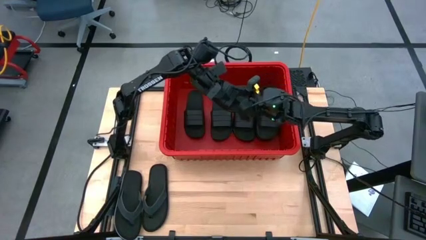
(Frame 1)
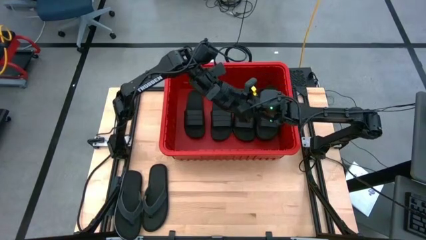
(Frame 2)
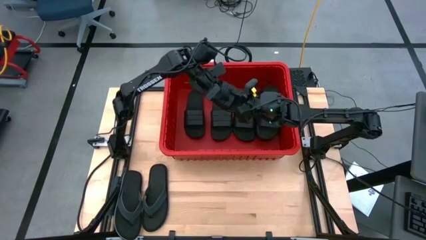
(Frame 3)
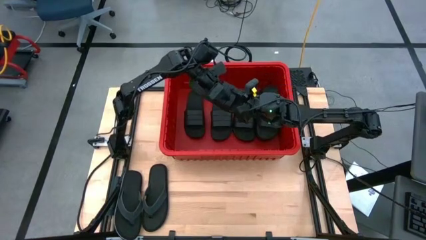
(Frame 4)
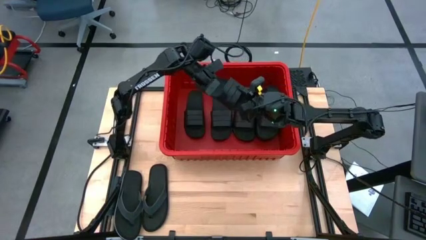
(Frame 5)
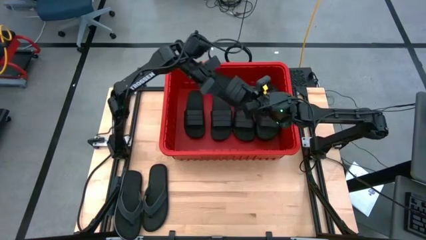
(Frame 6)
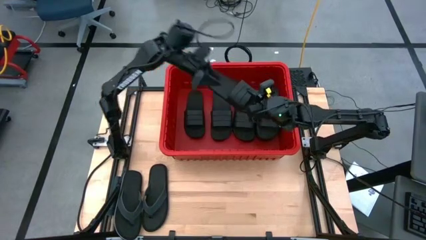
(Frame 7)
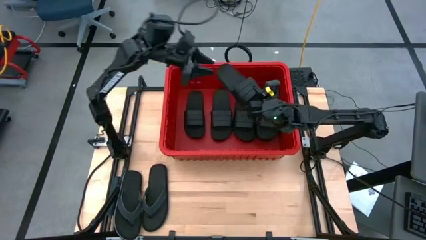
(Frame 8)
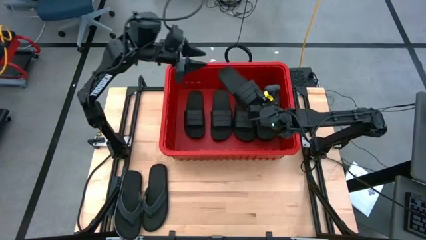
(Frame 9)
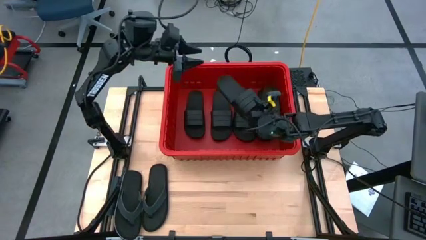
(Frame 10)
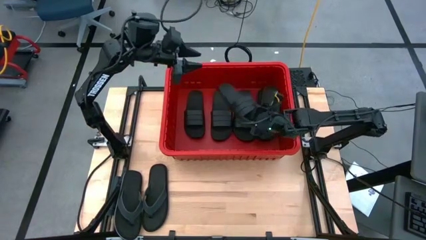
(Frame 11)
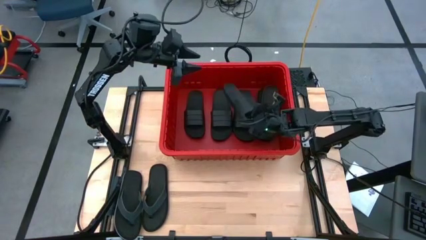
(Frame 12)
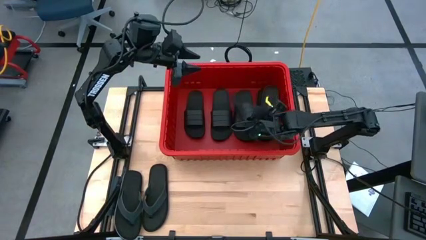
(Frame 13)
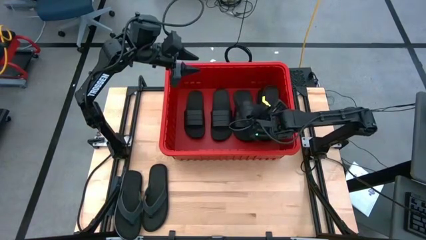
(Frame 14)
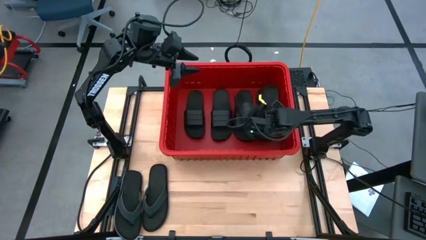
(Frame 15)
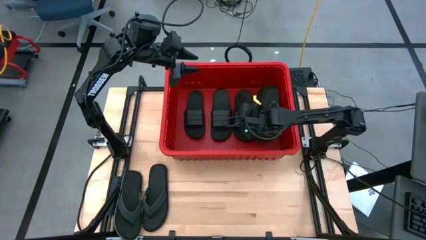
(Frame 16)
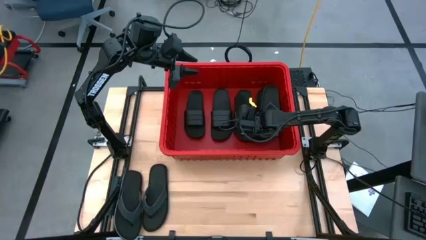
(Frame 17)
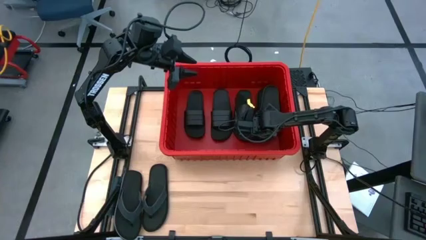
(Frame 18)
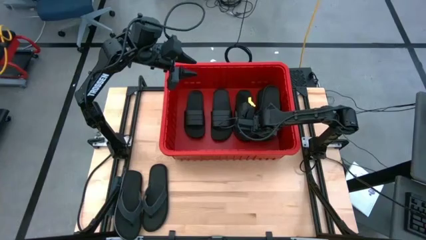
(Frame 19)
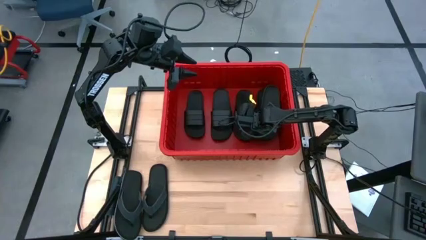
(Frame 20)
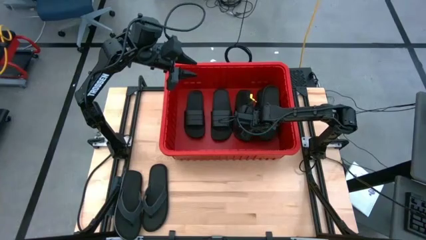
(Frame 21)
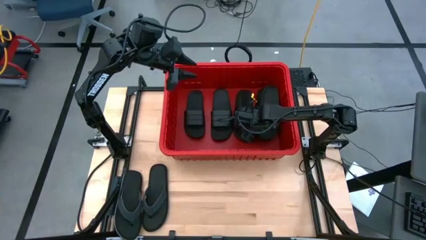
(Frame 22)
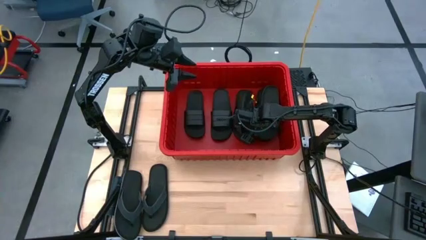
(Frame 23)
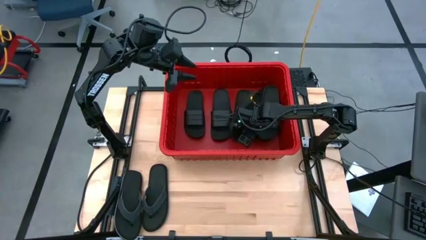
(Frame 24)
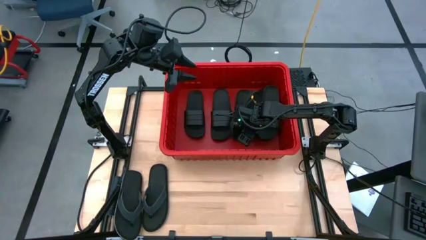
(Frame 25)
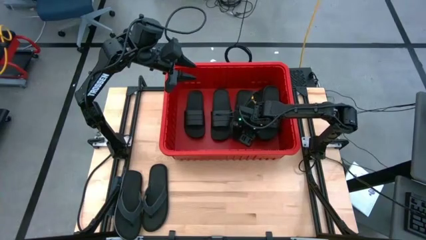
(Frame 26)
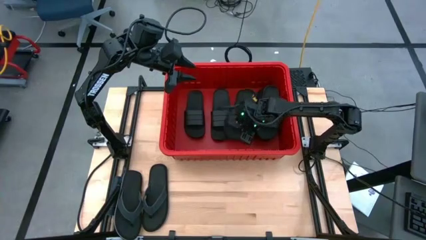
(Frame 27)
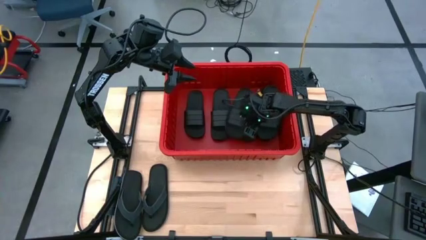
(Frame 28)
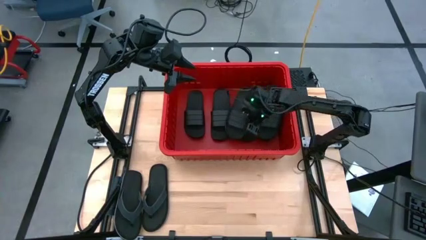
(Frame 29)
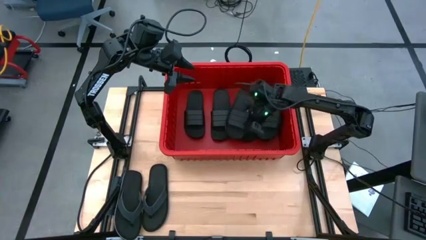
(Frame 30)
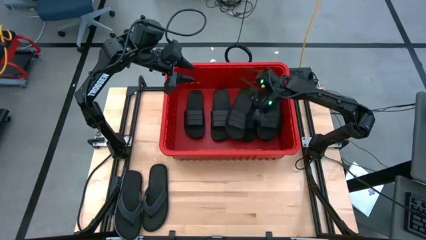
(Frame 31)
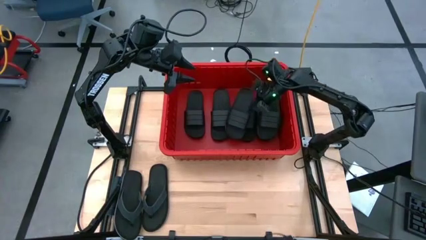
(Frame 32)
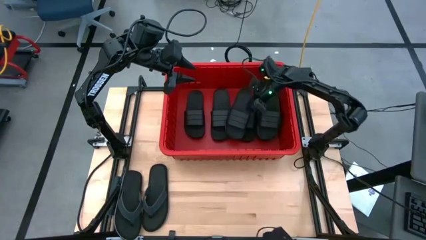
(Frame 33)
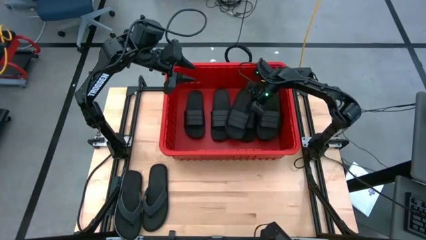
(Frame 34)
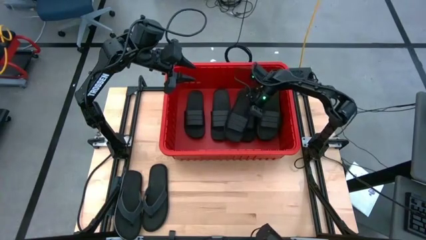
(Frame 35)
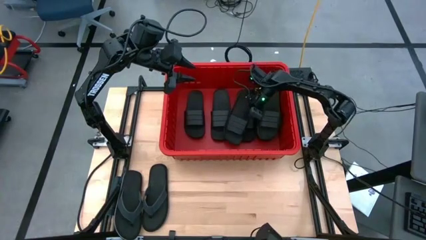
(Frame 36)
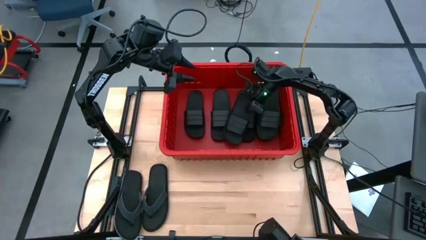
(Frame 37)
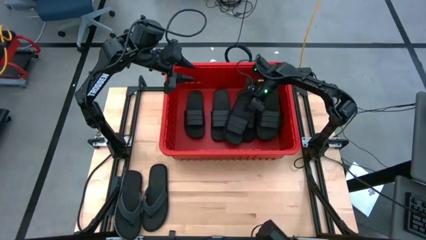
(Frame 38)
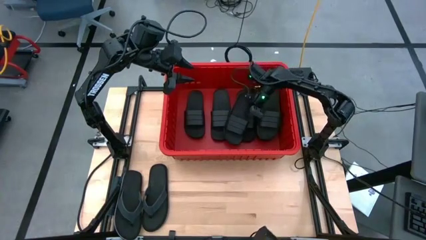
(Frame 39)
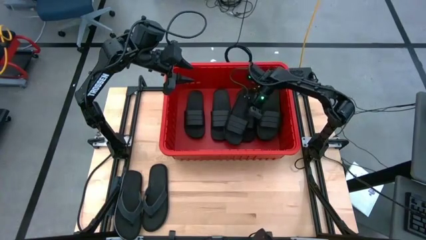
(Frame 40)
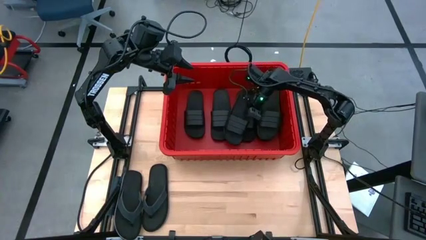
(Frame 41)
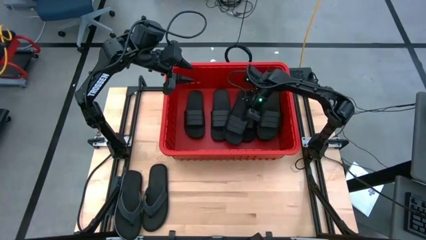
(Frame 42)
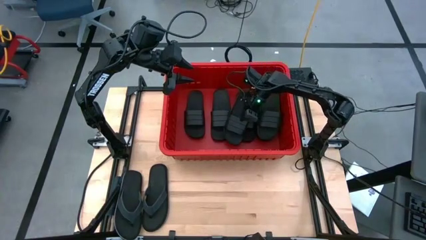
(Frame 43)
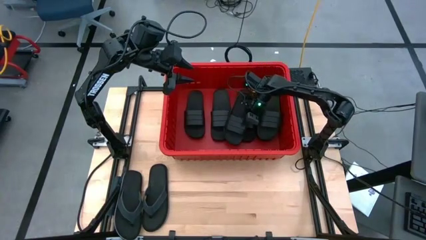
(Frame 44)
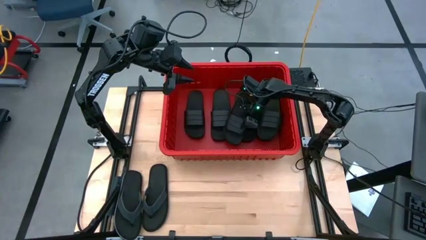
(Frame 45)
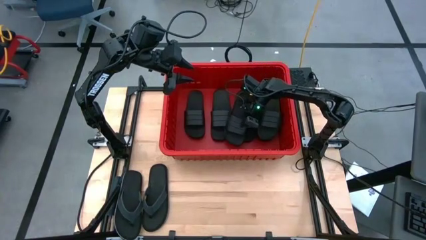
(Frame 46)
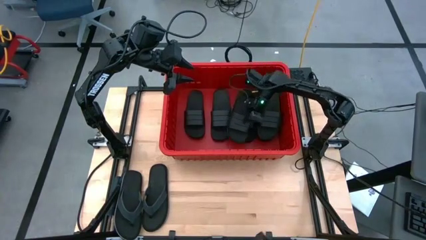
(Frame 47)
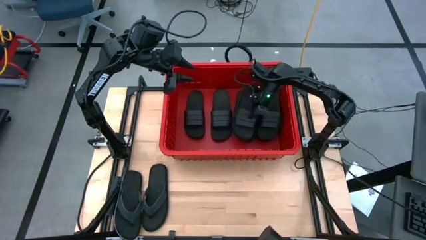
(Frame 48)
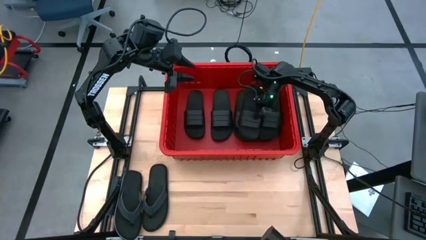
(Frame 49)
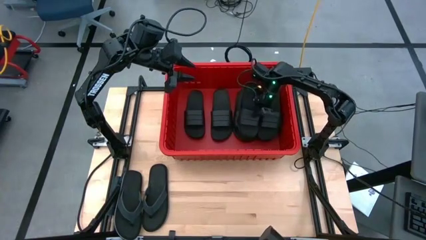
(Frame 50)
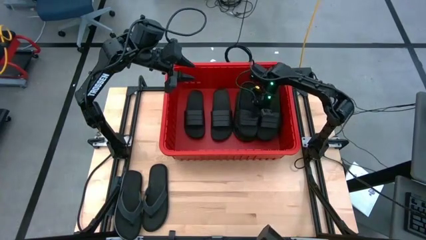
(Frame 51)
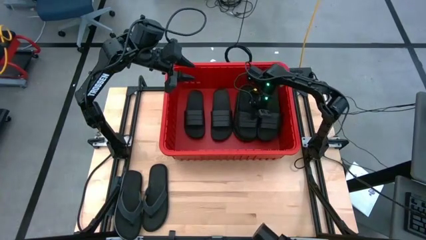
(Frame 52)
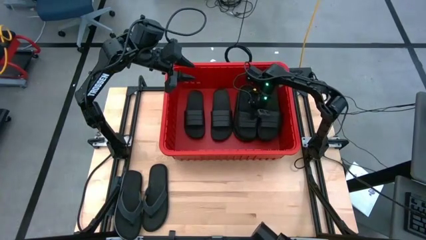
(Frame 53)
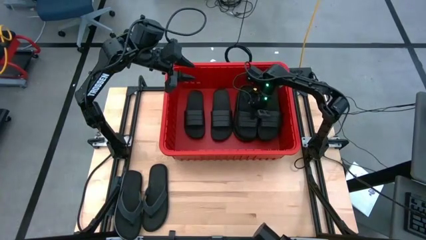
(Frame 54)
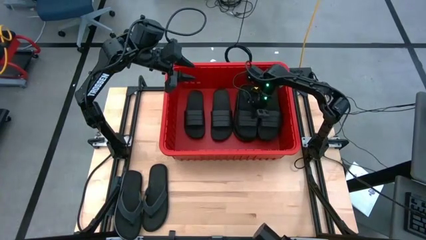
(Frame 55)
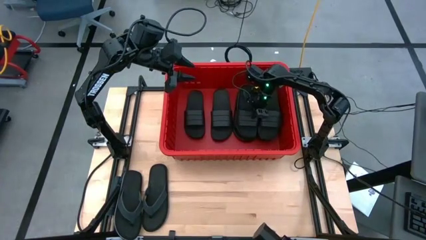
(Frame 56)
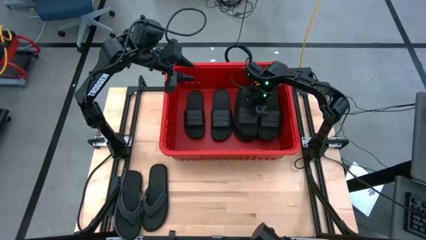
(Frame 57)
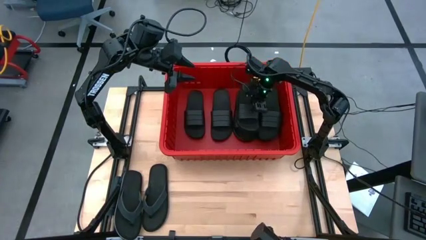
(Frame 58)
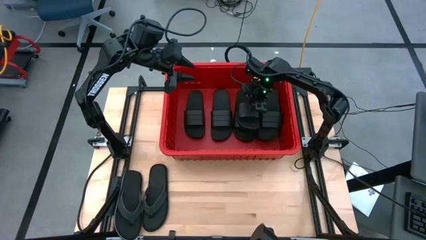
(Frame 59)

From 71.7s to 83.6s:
Task: Pick and place slides into bin
Put the black slide into the red bin
